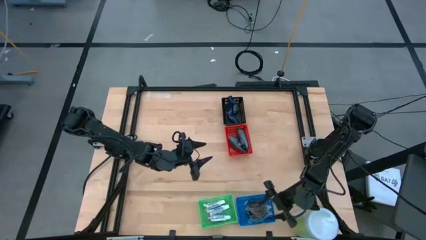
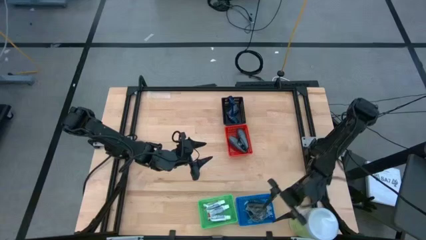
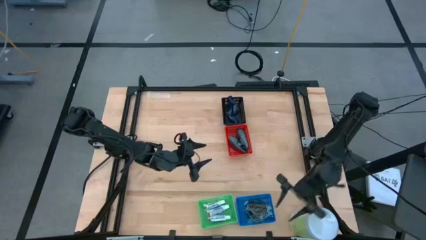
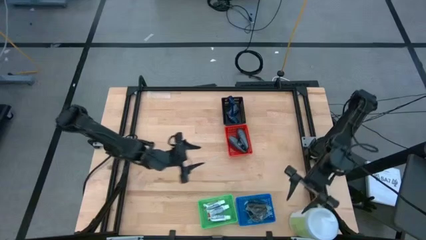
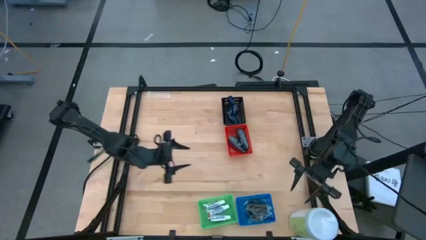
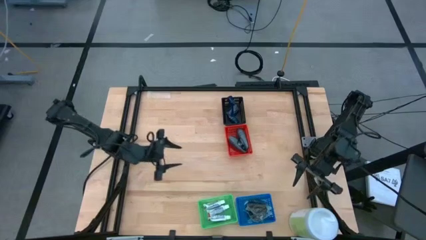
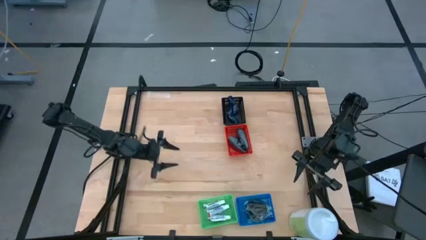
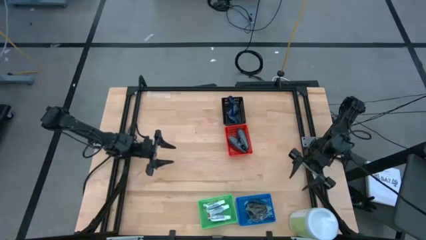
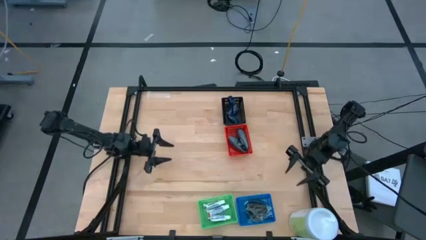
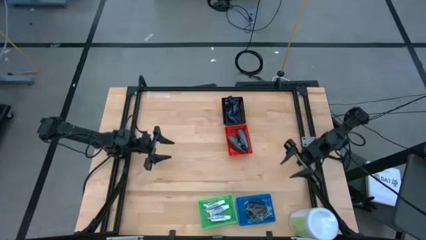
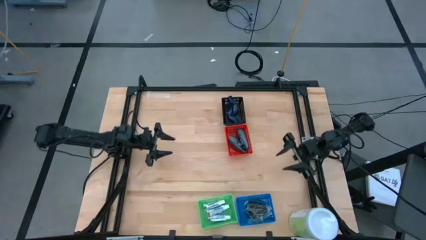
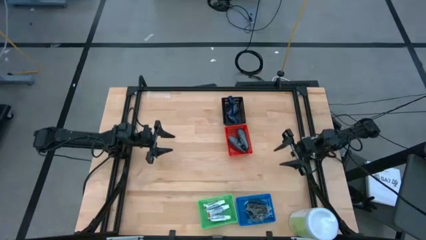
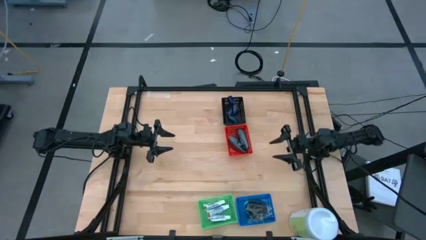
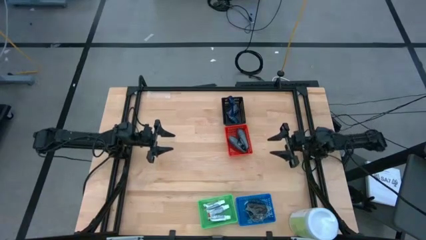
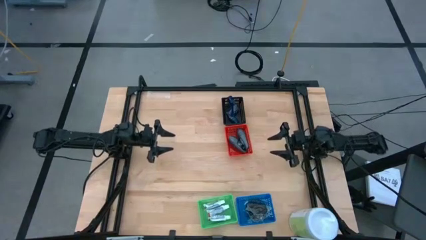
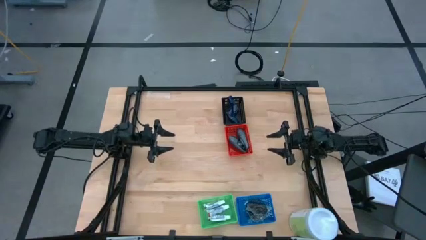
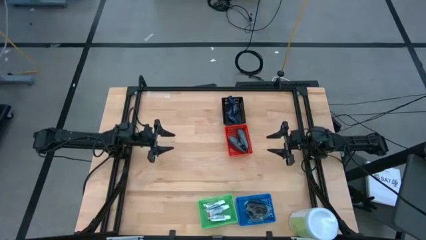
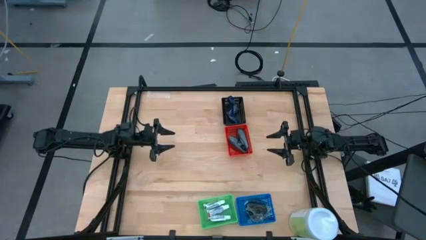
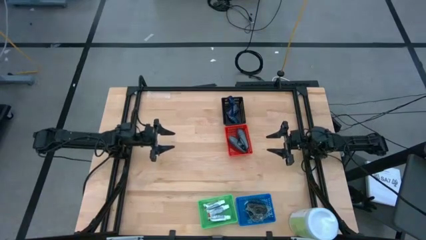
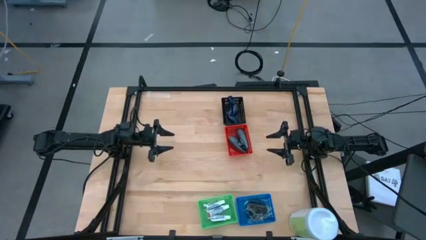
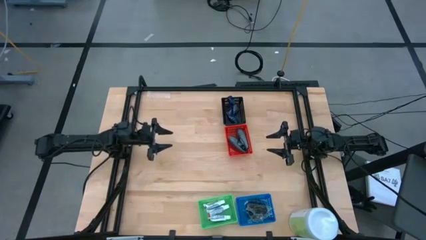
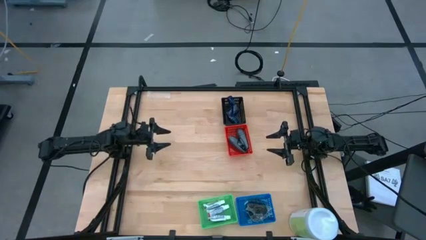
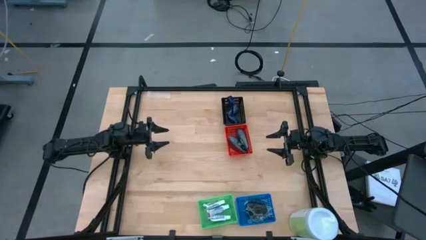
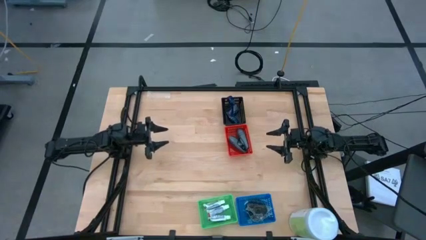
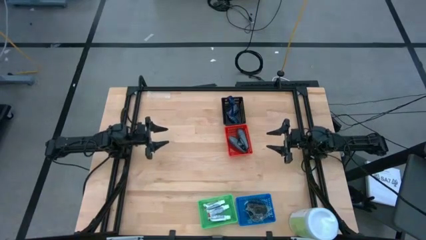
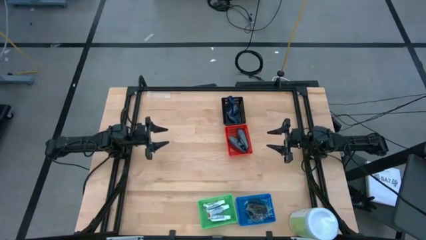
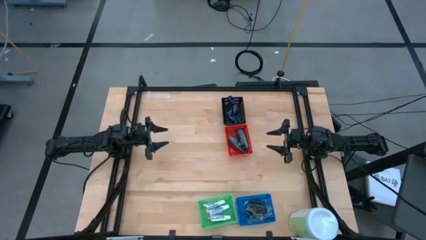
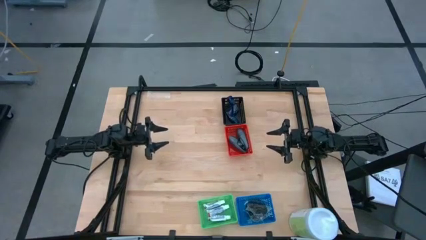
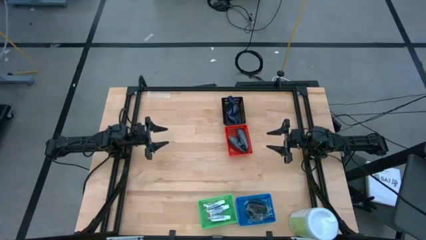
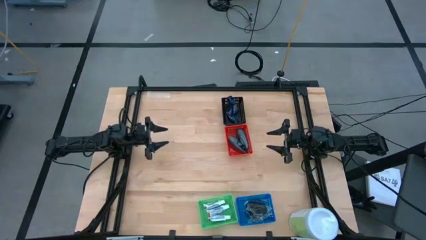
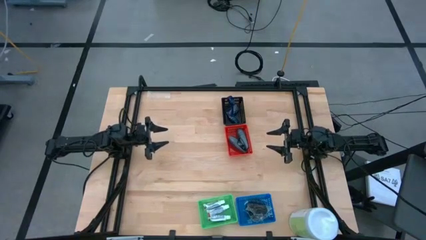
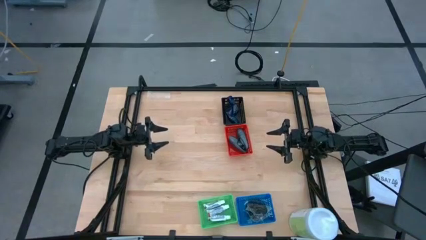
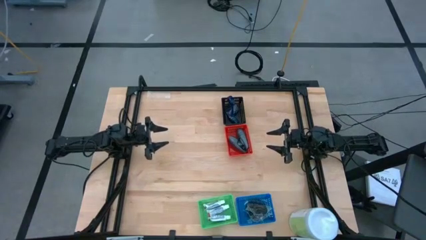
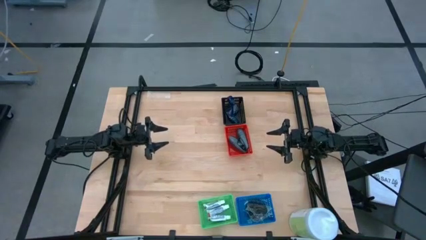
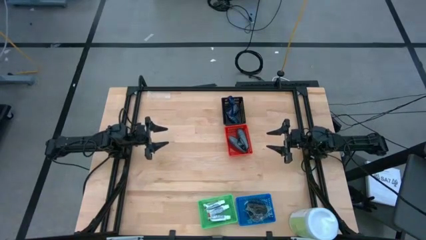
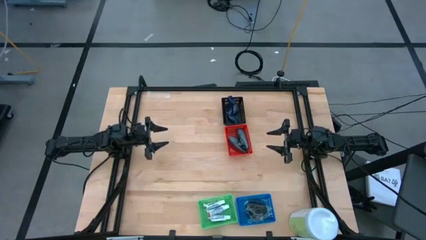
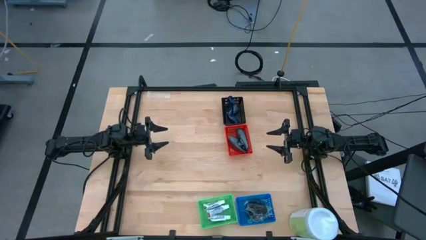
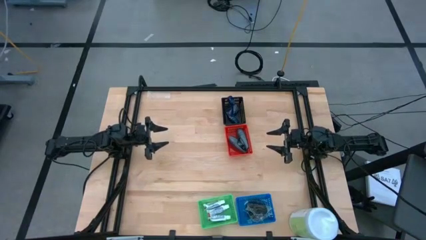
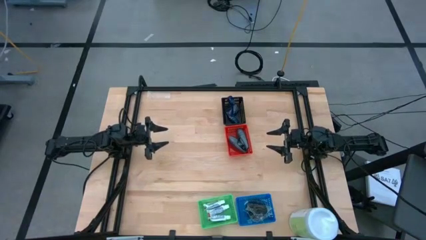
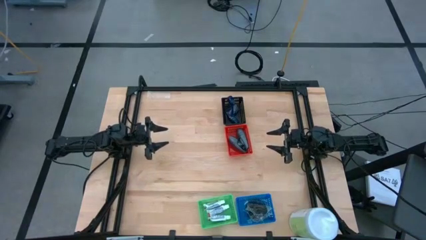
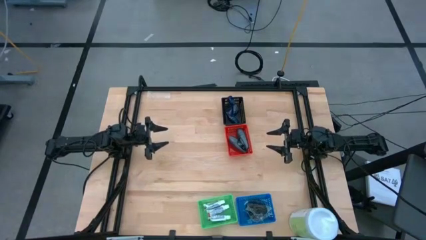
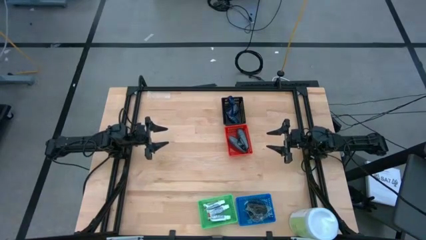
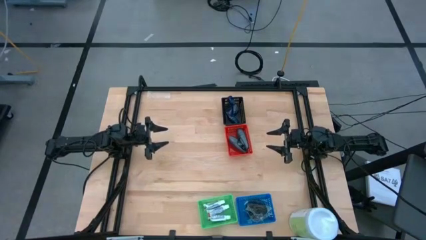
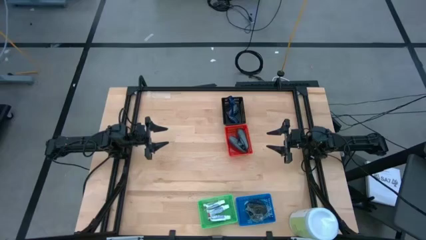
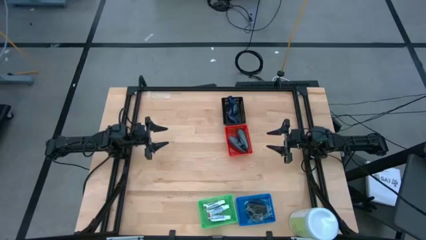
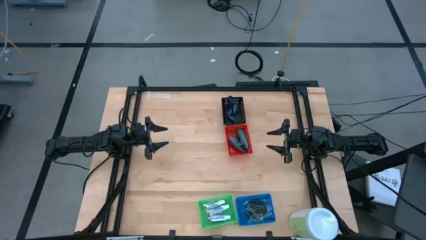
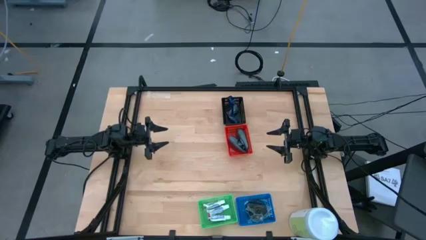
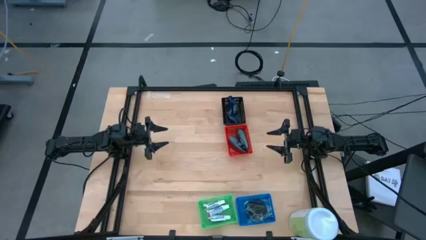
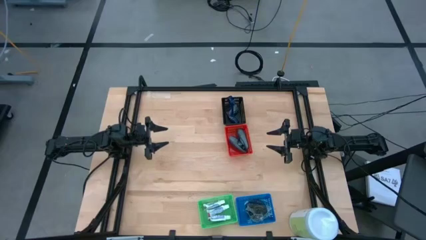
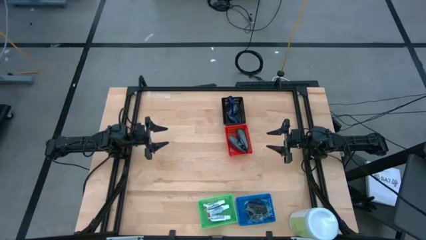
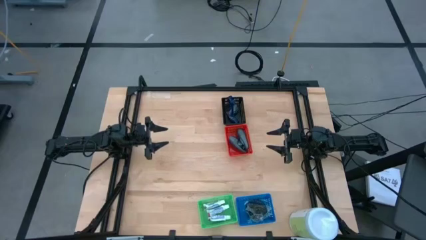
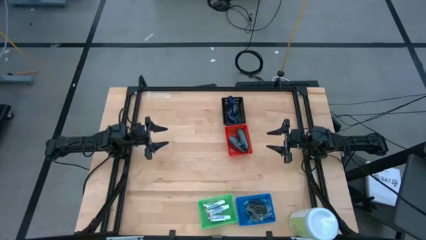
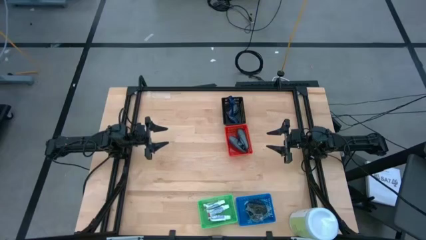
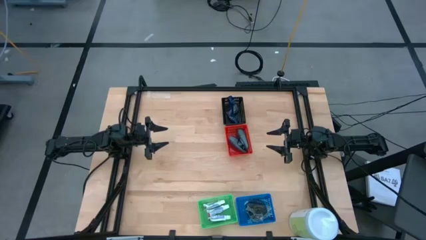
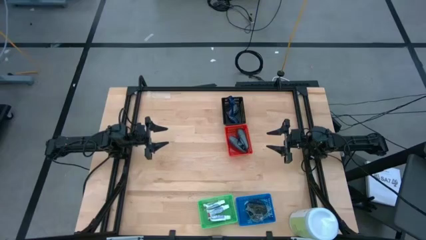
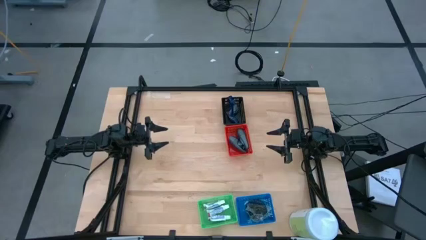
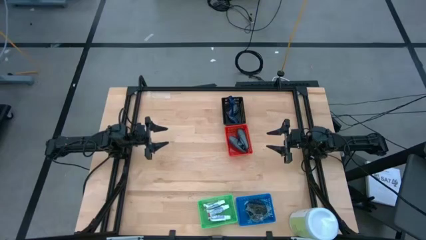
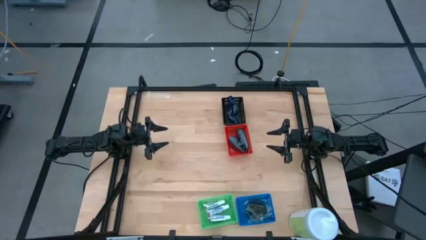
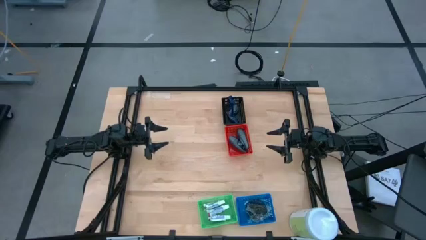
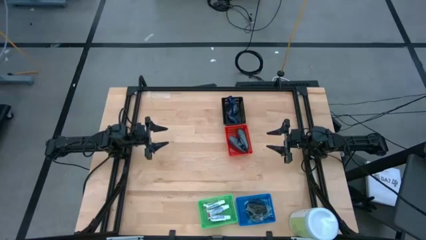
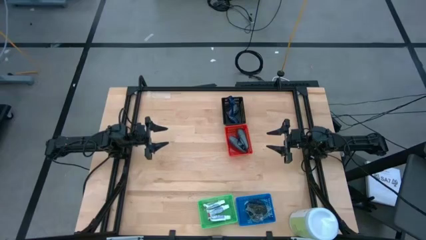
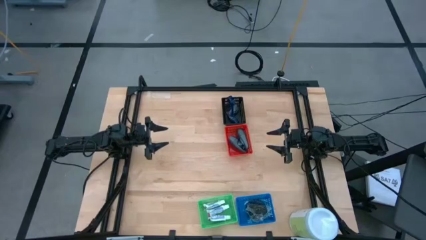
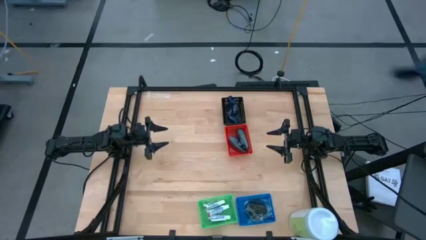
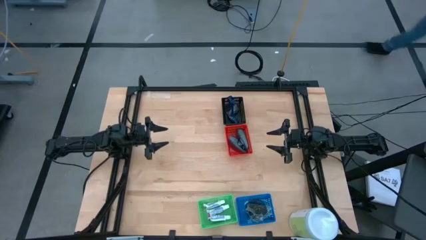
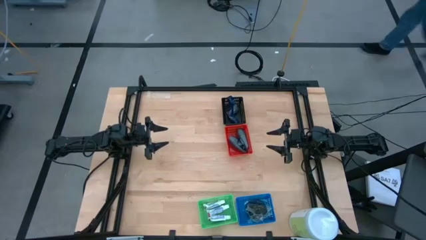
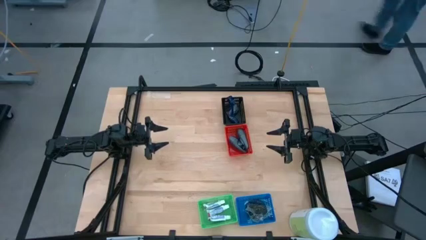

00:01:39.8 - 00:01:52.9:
Task: Pick & Place Travel size toiletries
Return to Home Position
